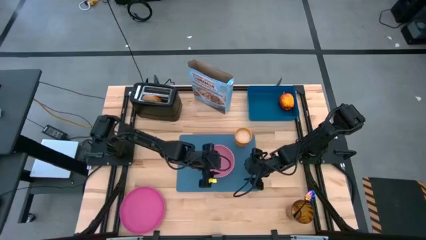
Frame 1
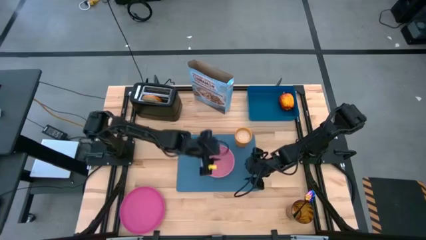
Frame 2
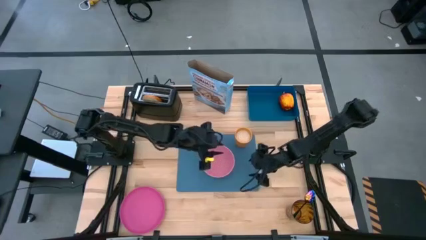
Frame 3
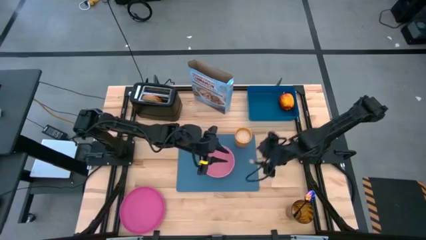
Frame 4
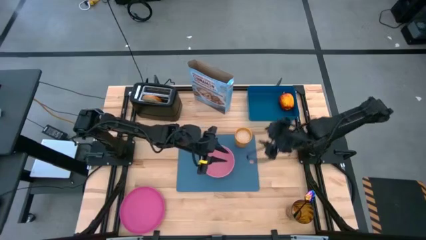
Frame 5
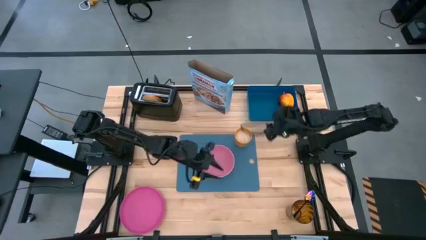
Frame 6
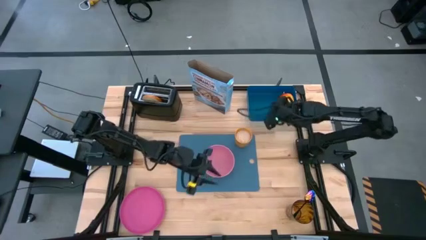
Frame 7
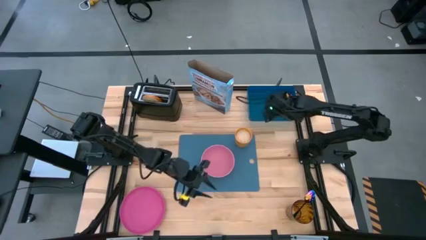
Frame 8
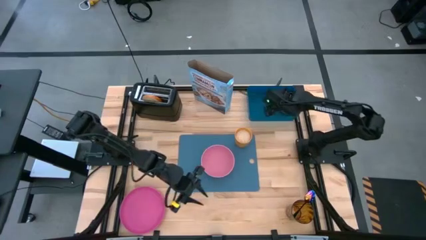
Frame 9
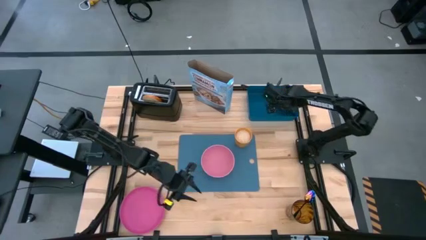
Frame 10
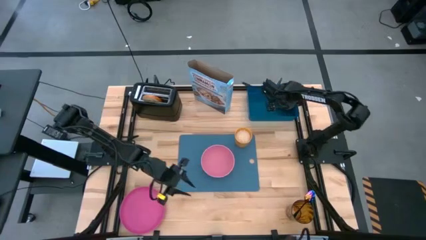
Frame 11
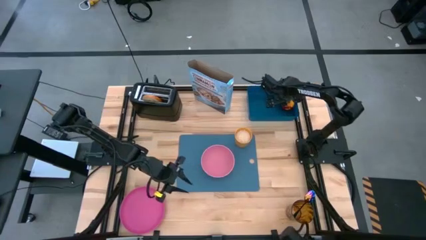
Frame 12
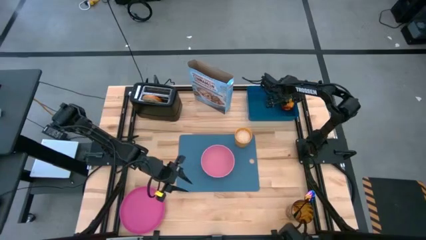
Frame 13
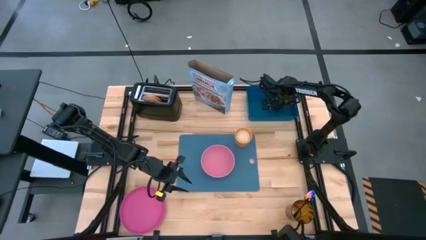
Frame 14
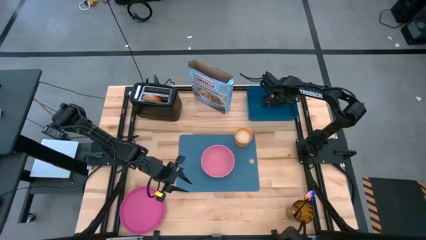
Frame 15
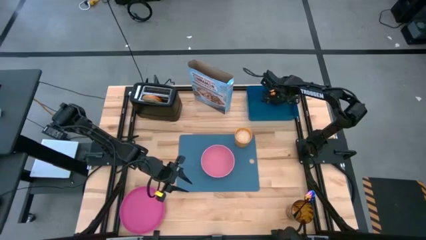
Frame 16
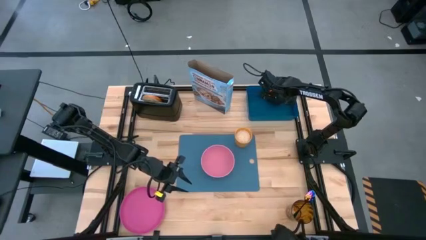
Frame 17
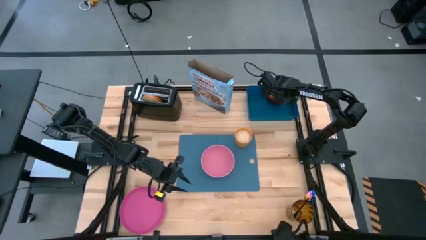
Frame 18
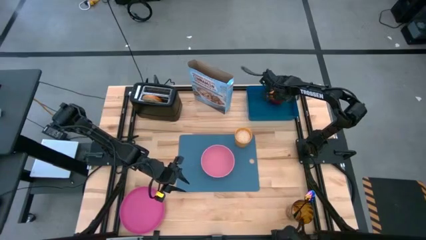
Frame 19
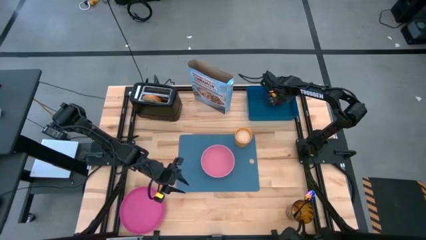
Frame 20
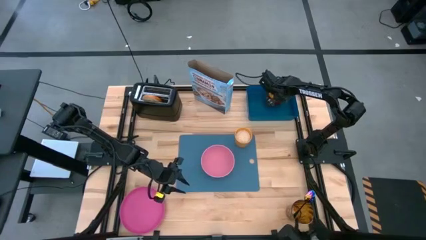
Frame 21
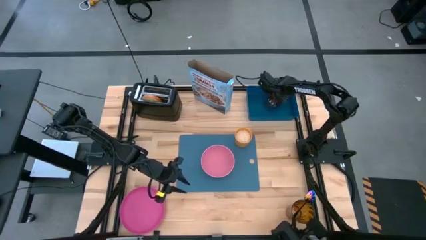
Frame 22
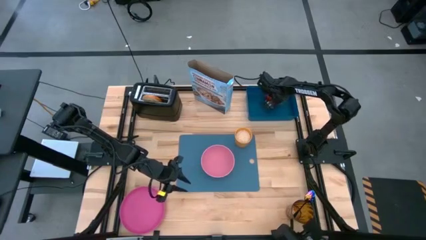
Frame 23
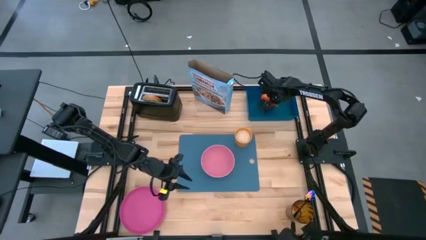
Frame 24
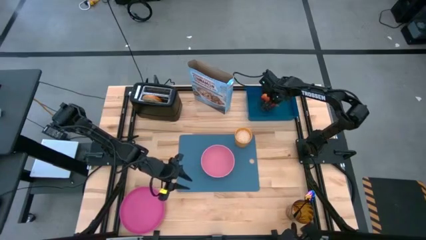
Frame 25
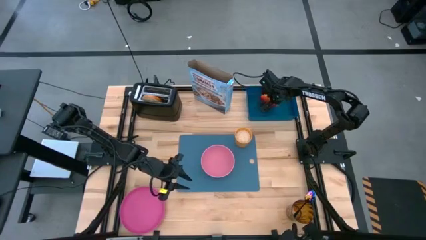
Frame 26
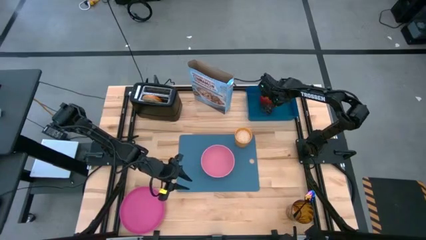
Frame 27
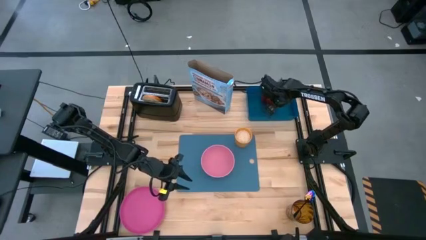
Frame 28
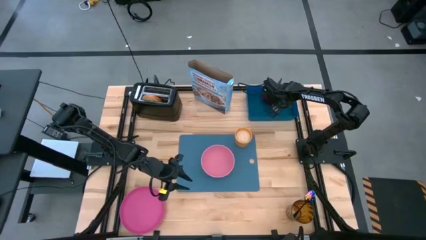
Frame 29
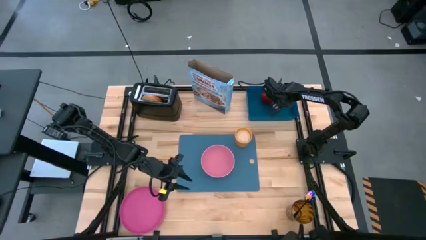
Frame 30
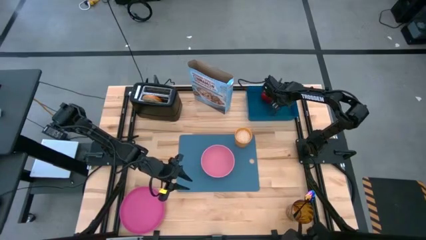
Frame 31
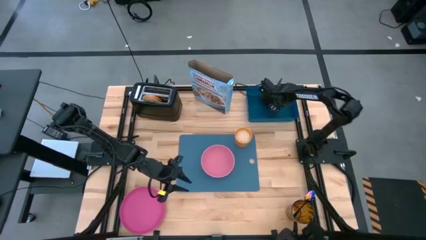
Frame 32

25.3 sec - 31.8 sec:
Task: Arrange a breakfast setting
Put the apple on the blue cutting board to the top left of the pink bowl

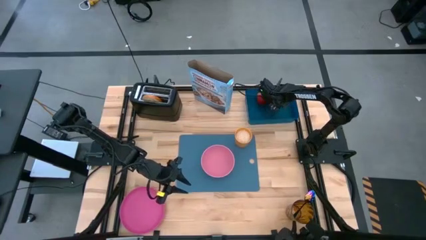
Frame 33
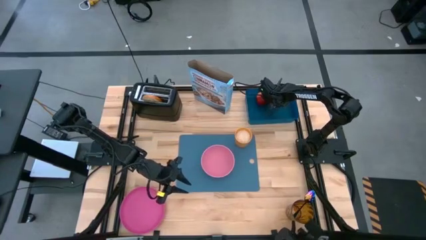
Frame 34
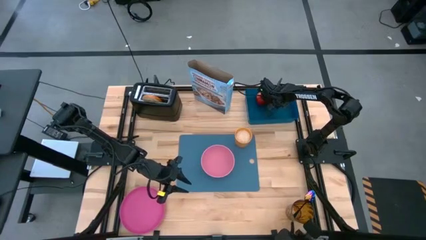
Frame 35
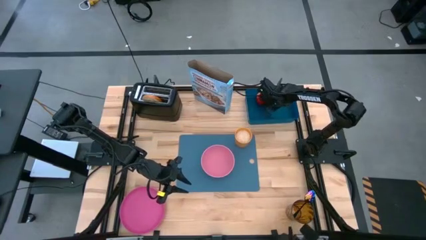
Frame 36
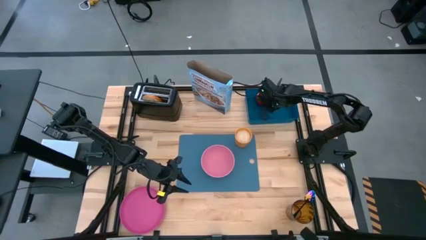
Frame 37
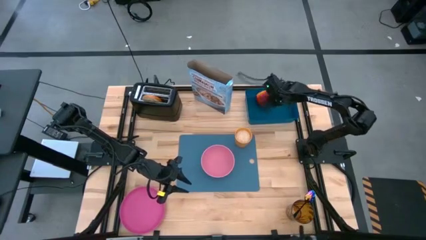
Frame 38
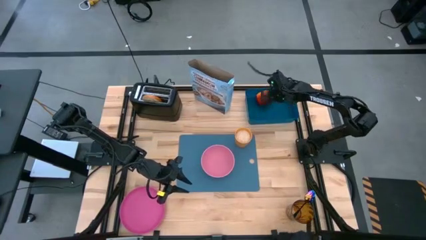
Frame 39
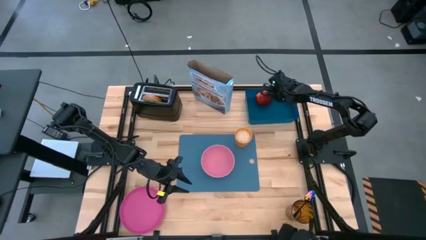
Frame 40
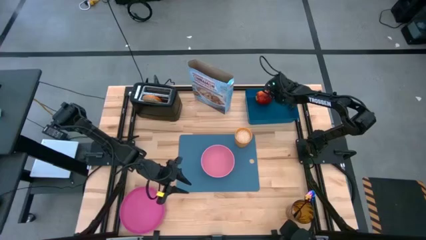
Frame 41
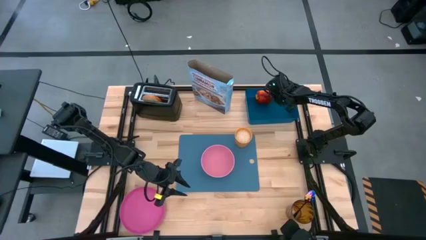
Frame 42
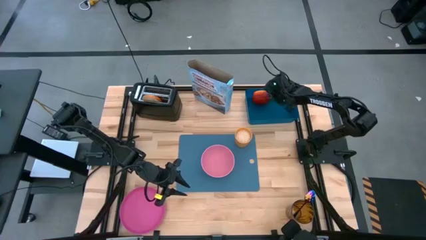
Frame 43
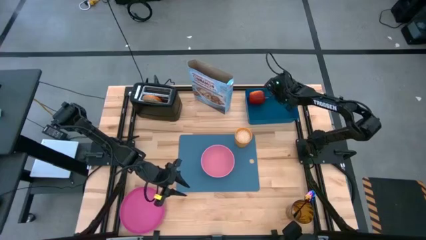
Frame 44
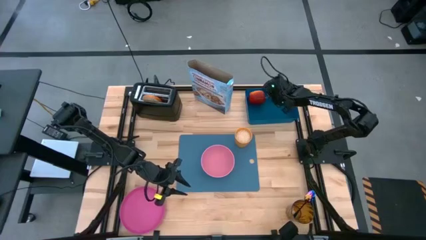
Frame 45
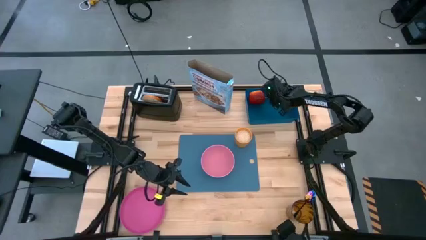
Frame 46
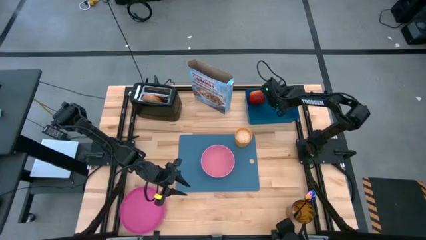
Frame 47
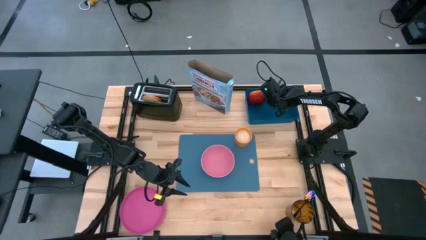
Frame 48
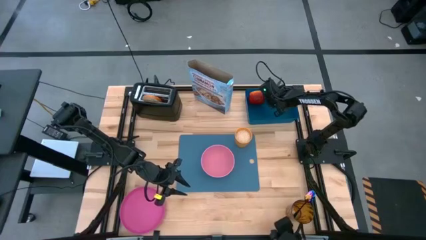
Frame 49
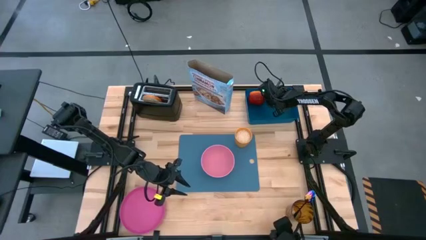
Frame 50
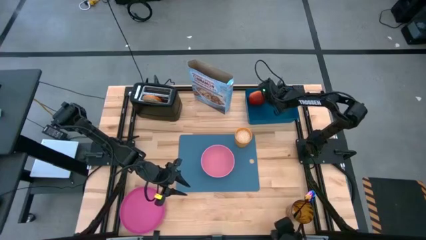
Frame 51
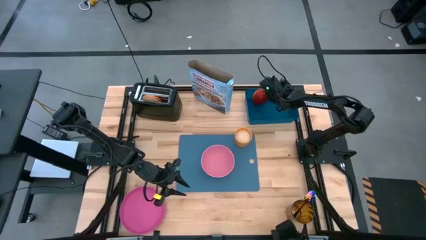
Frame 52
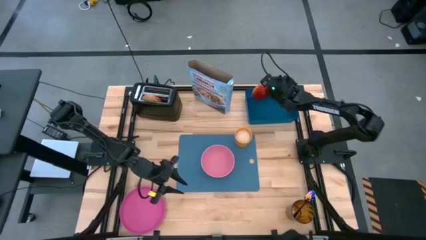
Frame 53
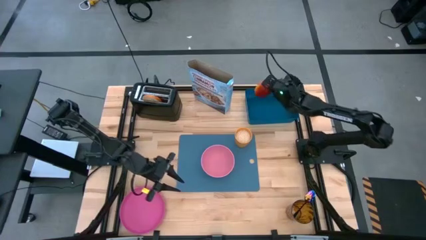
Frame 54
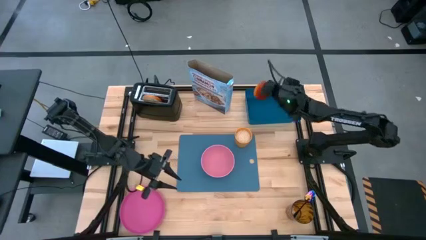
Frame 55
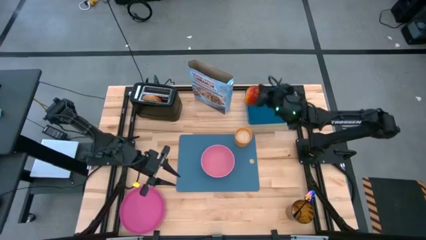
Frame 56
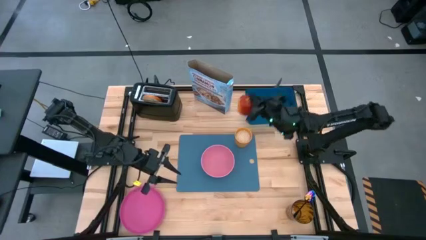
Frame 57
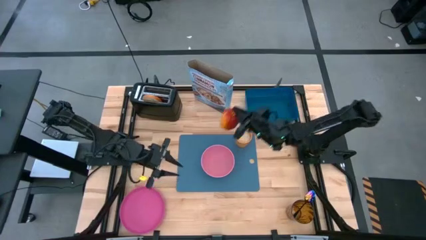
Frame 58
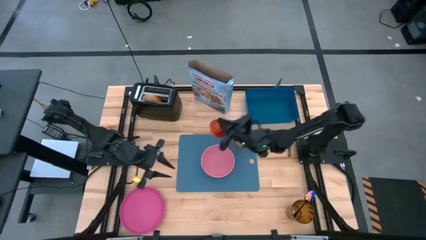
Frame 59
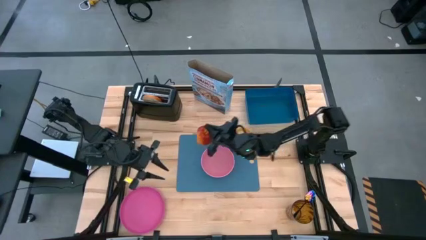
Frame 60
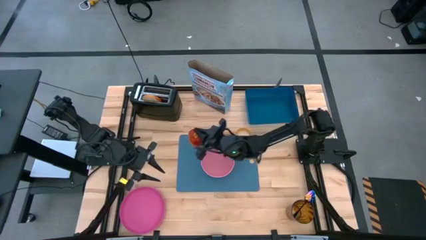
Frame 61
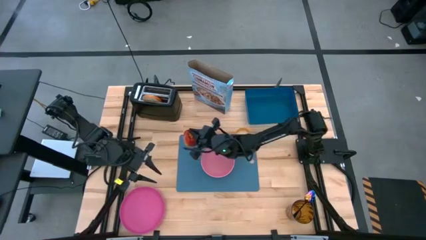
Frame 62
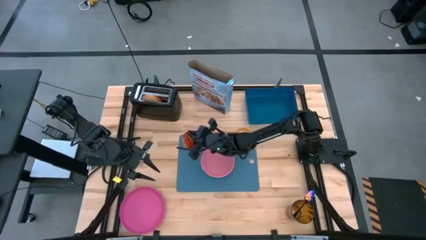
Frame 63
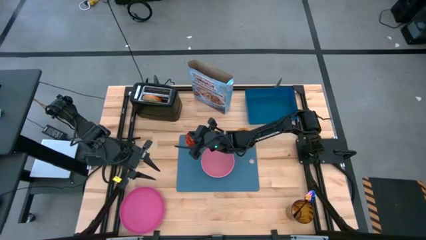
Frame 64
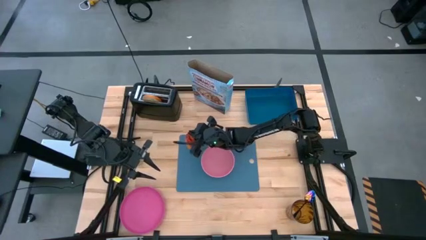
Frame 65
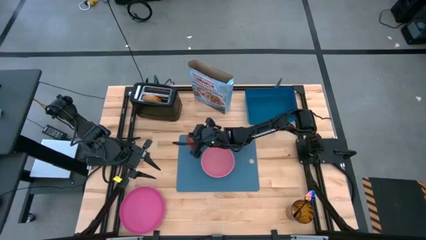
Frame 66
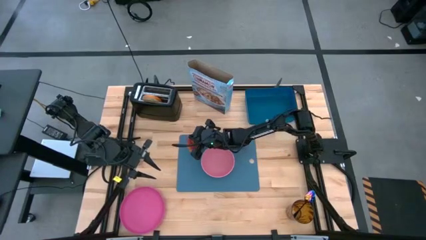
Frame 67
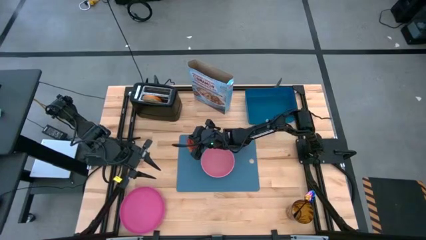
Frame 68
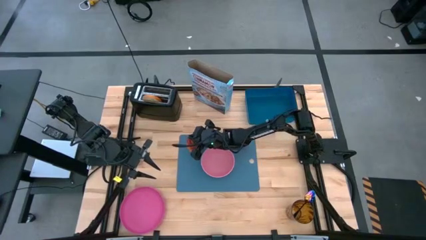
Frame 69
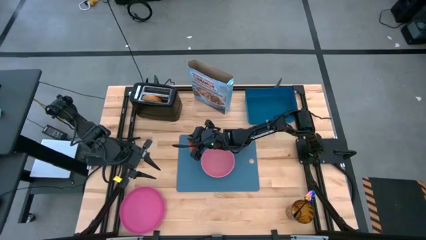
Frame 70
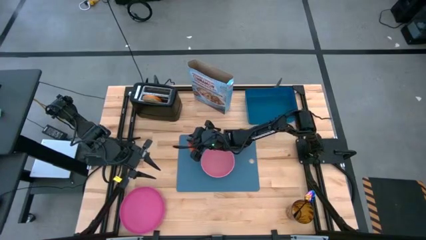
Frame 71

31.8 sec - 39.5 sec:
Put the apple on the blue cutting board to the top left of the pink bowl

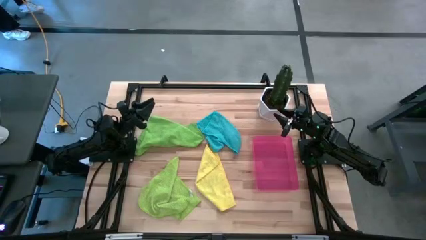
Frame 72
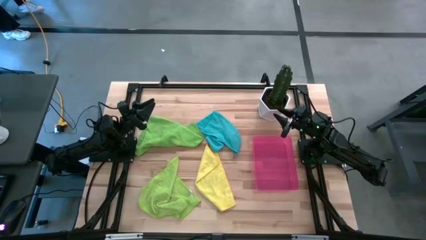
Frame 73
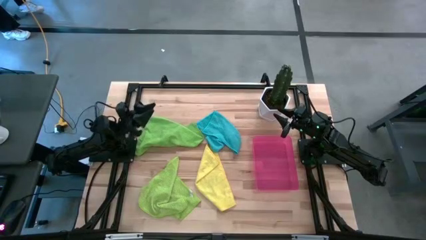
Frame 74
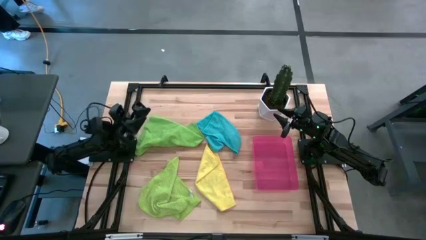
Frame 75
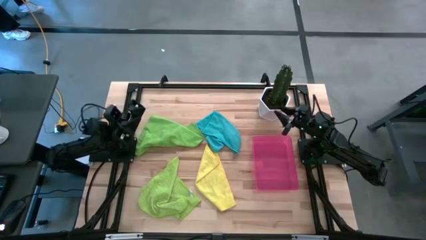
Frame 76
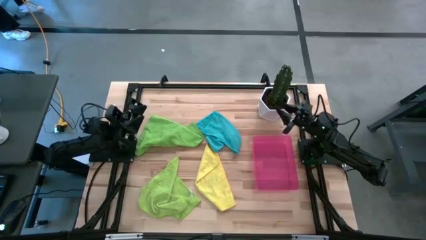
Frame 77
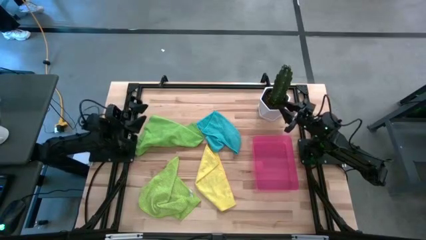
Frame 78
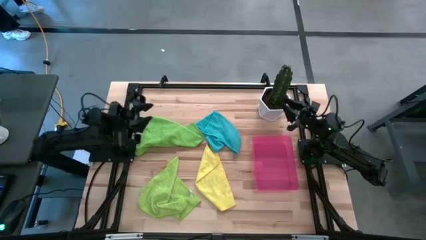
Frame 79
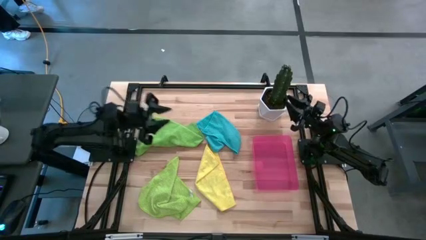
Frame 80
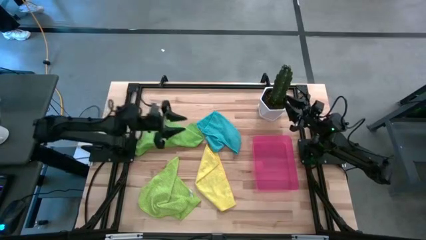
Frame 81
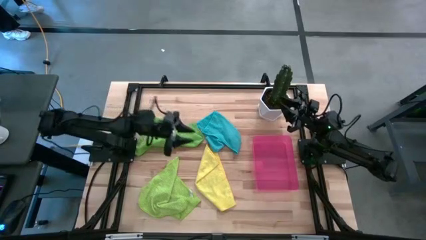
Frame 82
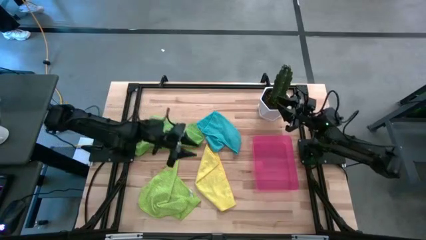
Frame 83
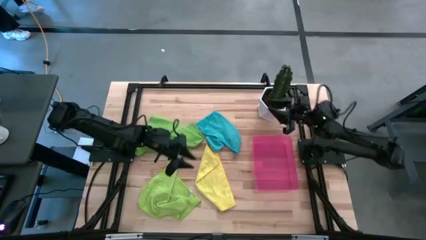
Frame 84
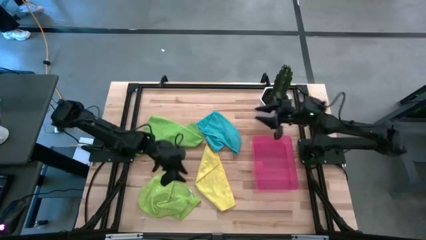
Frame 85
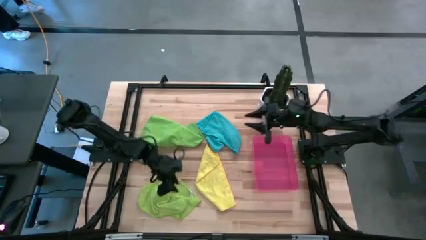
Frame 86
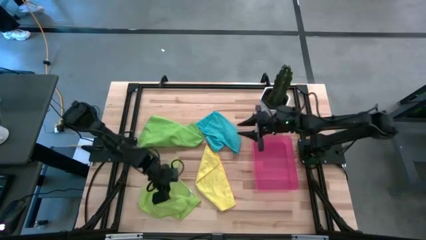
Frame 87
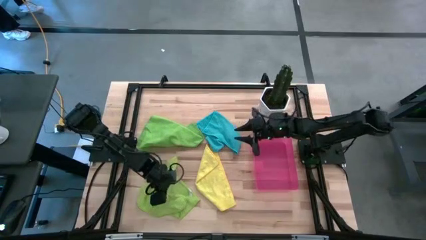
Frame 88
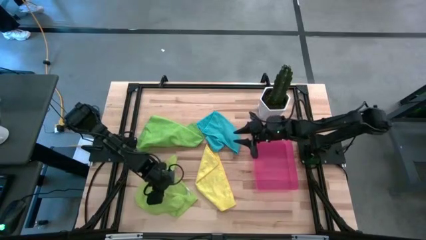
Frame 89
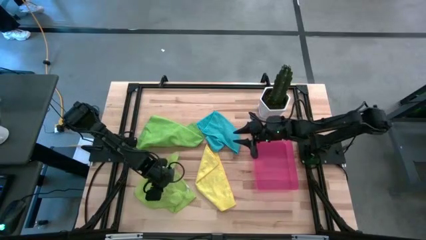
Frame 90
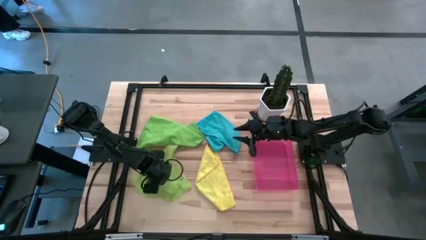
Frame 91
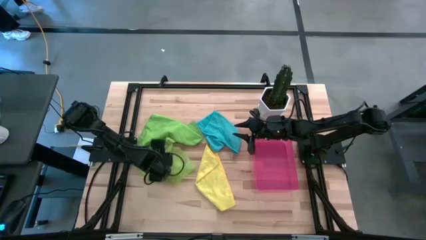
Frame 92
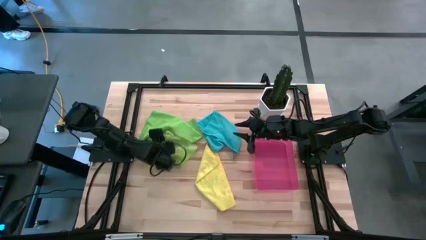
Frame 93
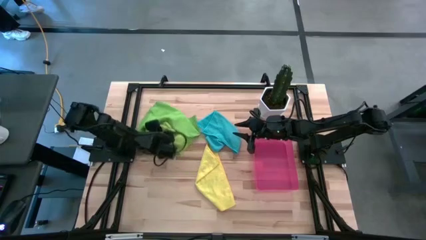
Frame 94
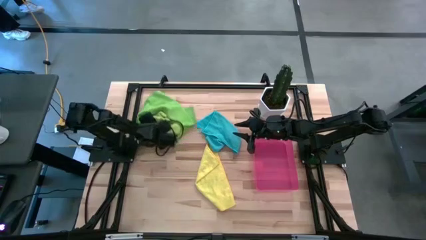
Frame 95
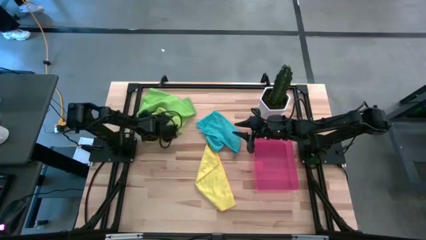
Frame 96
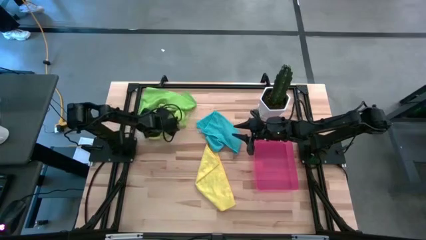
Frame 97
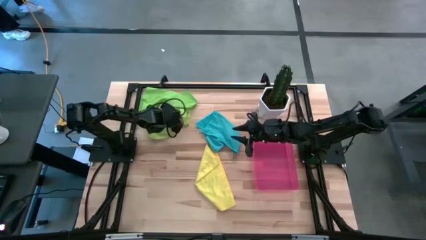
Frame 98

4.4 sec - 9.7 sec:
Task: Roll microfiber towels into tight, uniform cylinder then place into a basket
Move the green microfiber towel to the top
